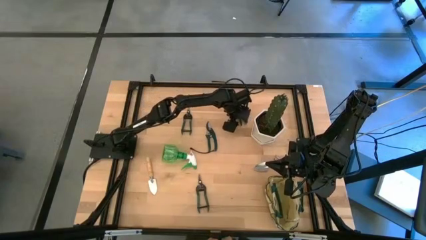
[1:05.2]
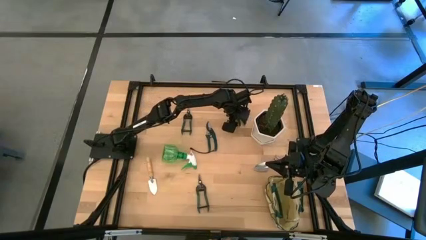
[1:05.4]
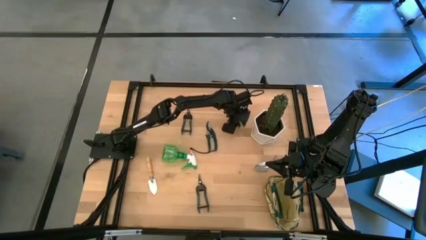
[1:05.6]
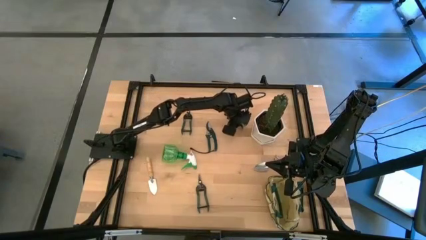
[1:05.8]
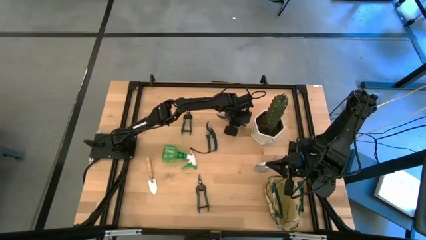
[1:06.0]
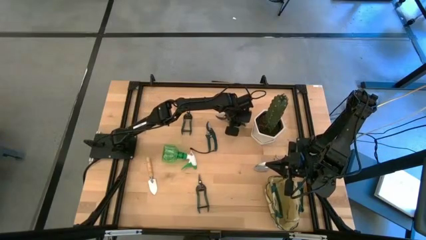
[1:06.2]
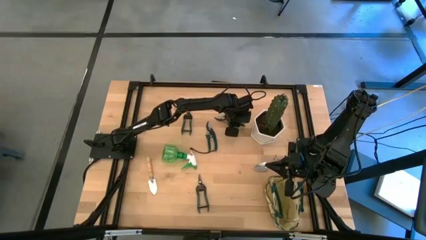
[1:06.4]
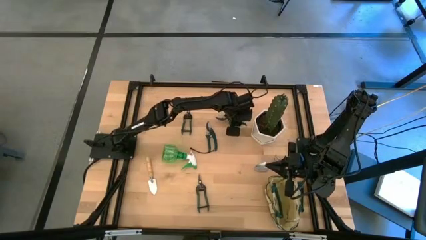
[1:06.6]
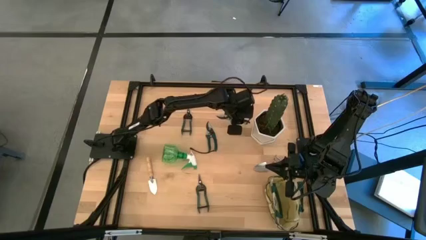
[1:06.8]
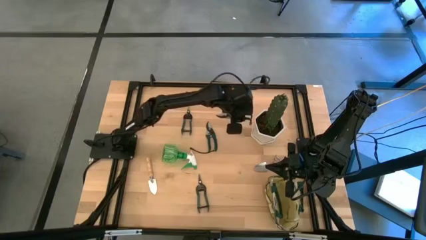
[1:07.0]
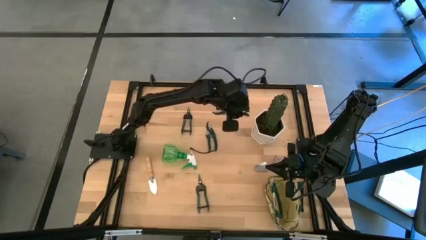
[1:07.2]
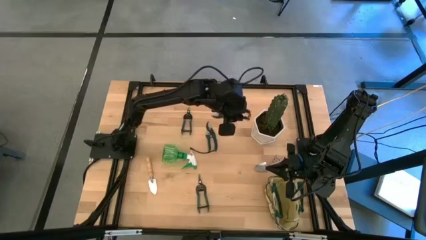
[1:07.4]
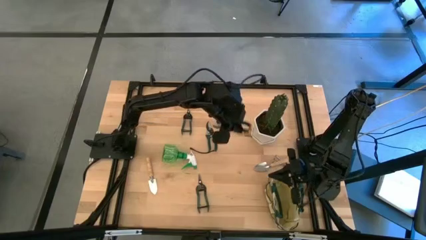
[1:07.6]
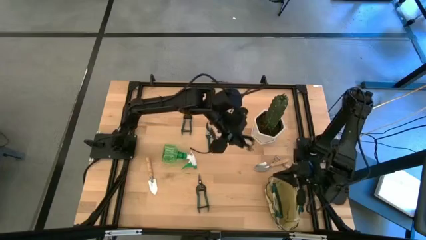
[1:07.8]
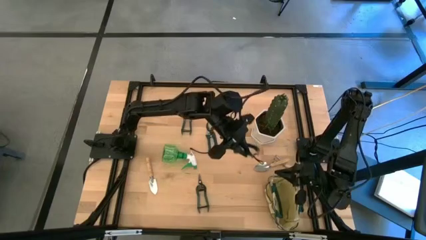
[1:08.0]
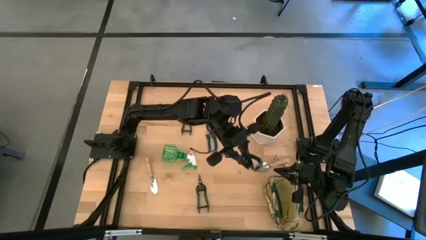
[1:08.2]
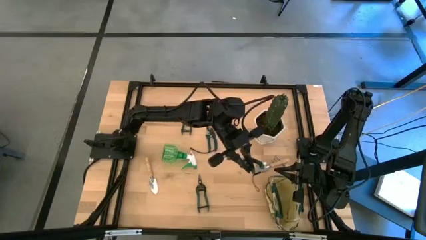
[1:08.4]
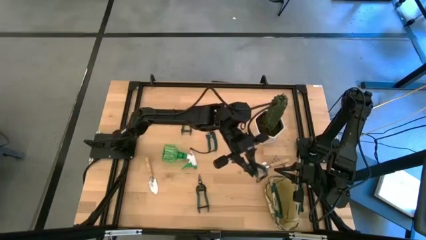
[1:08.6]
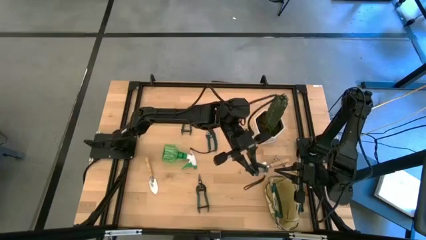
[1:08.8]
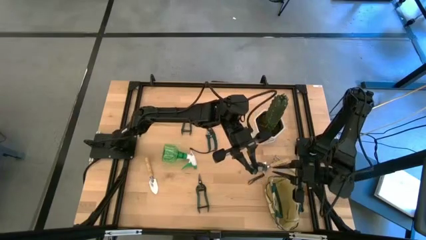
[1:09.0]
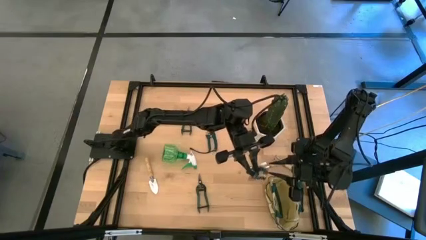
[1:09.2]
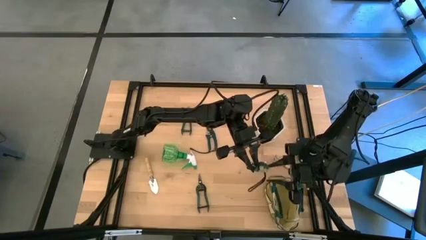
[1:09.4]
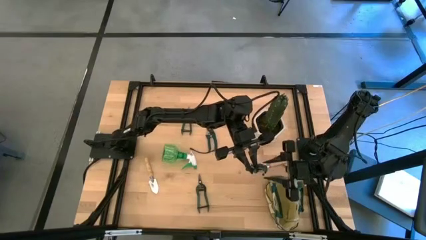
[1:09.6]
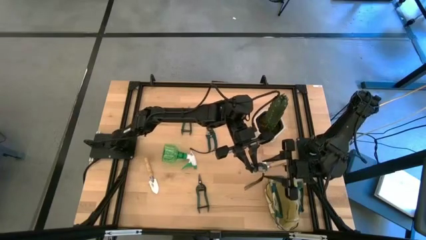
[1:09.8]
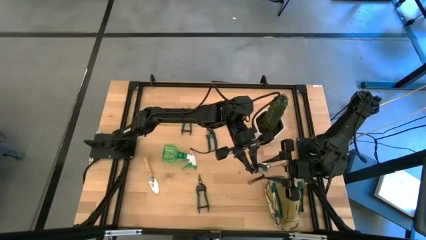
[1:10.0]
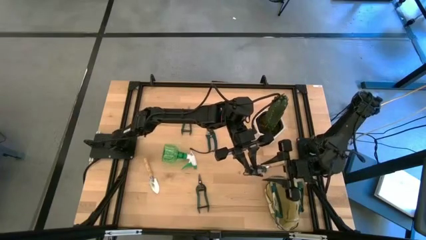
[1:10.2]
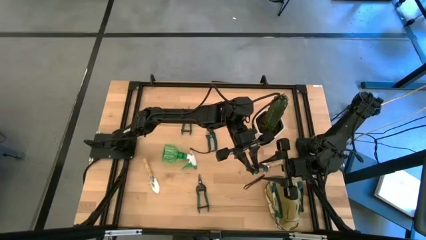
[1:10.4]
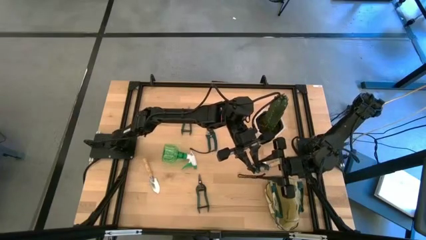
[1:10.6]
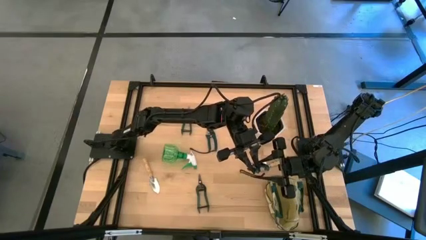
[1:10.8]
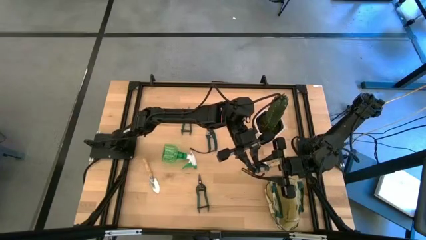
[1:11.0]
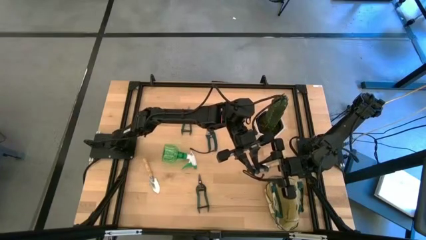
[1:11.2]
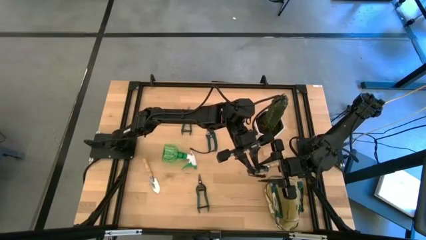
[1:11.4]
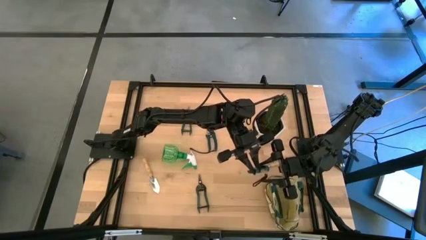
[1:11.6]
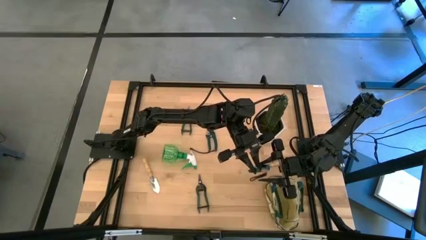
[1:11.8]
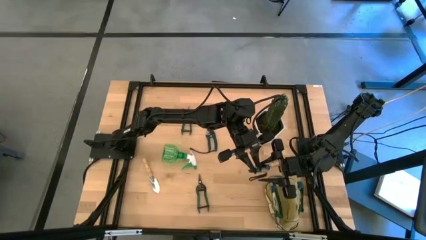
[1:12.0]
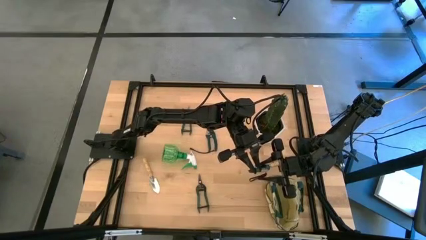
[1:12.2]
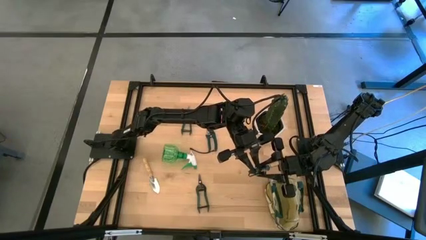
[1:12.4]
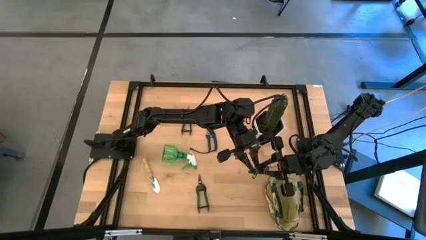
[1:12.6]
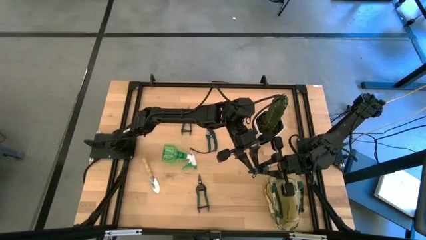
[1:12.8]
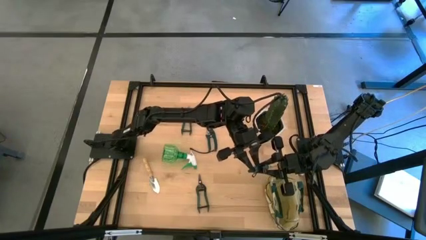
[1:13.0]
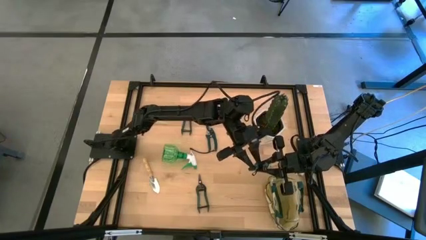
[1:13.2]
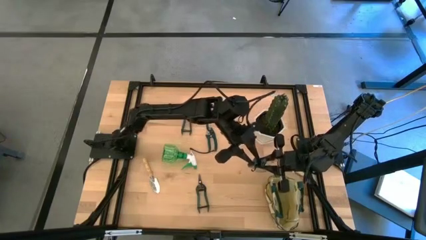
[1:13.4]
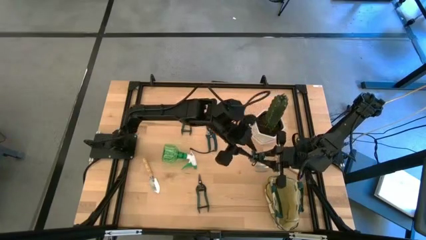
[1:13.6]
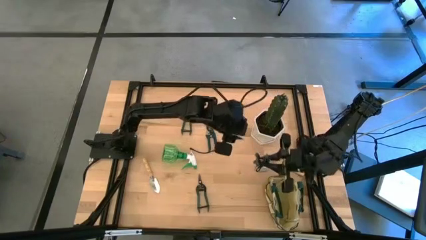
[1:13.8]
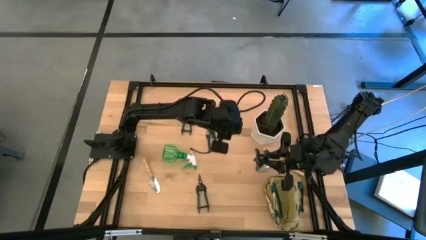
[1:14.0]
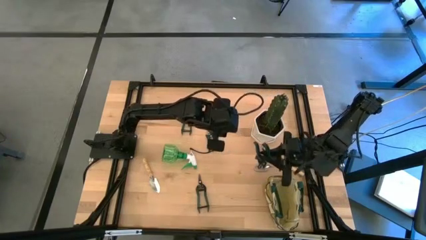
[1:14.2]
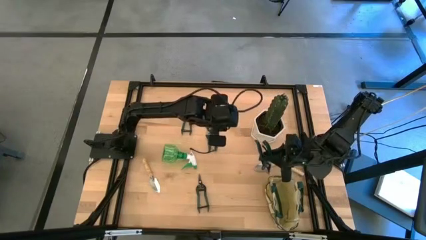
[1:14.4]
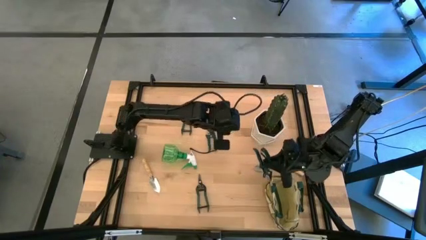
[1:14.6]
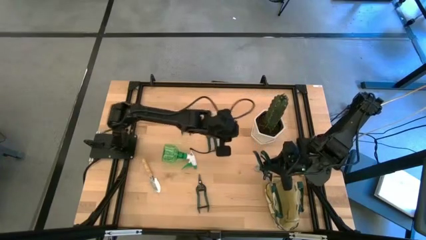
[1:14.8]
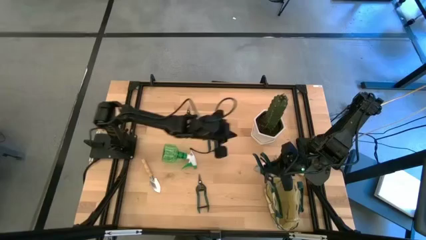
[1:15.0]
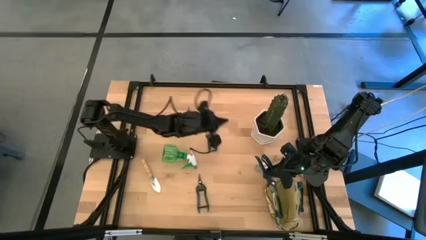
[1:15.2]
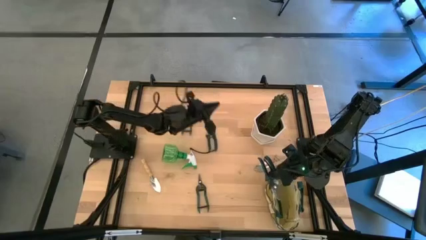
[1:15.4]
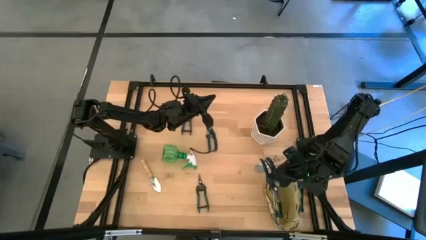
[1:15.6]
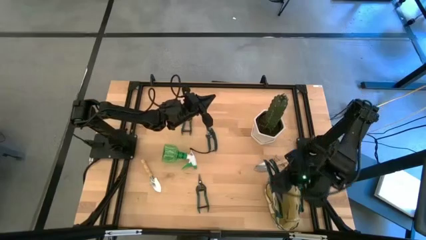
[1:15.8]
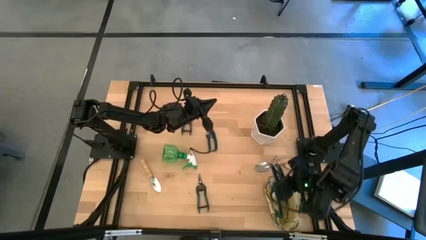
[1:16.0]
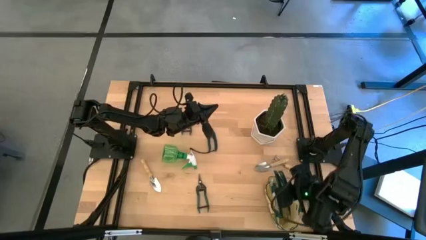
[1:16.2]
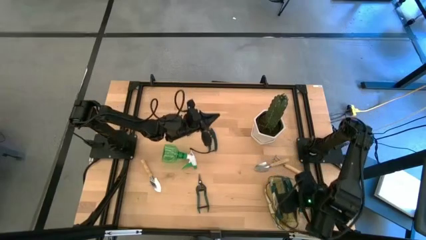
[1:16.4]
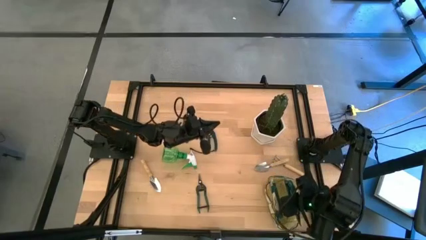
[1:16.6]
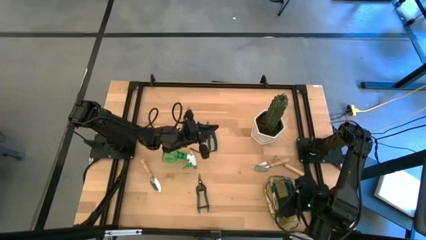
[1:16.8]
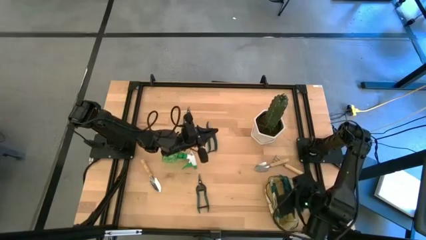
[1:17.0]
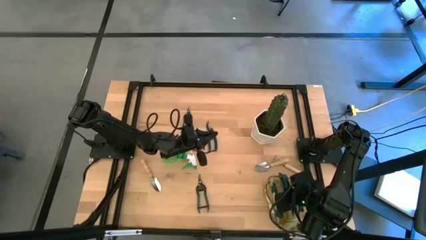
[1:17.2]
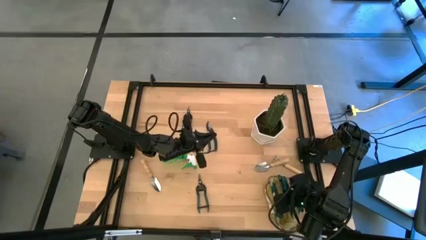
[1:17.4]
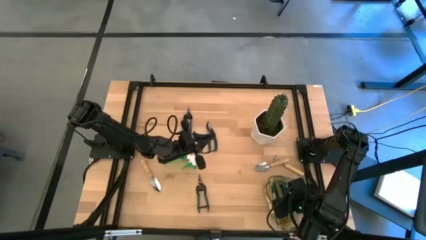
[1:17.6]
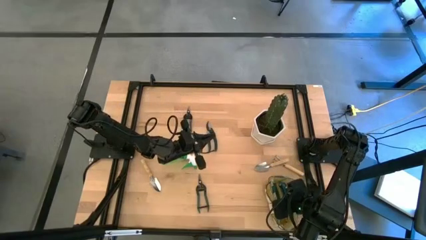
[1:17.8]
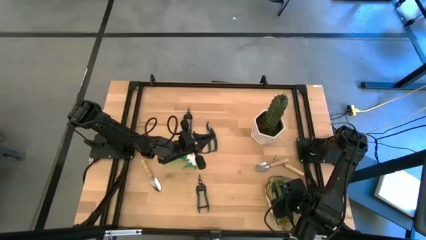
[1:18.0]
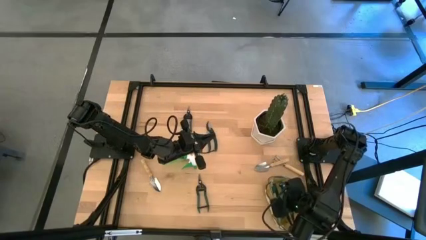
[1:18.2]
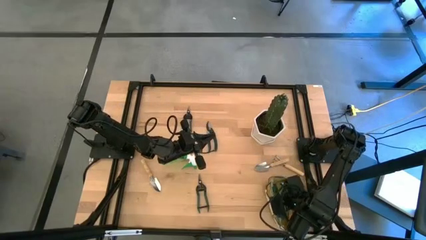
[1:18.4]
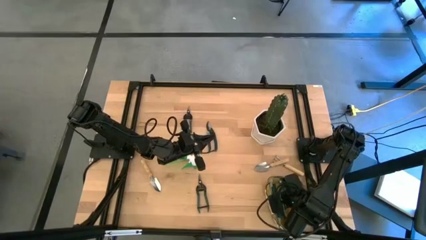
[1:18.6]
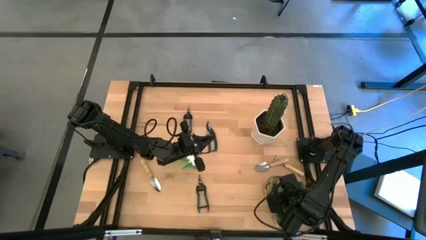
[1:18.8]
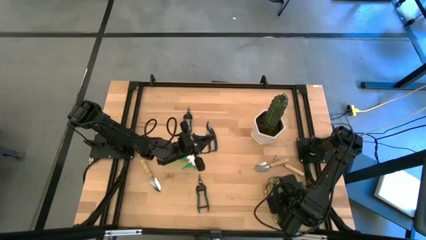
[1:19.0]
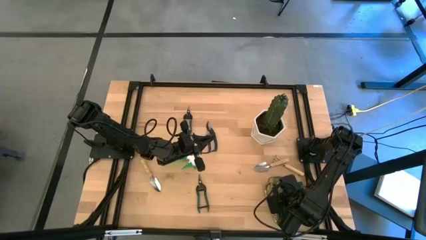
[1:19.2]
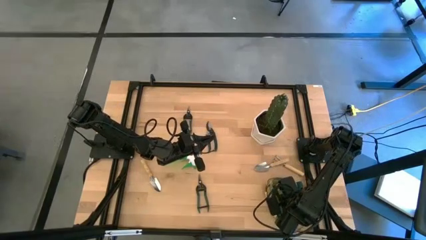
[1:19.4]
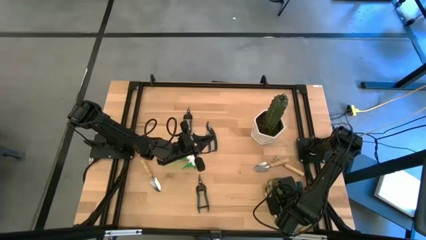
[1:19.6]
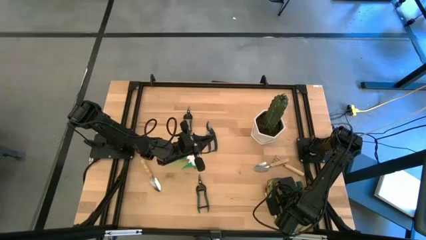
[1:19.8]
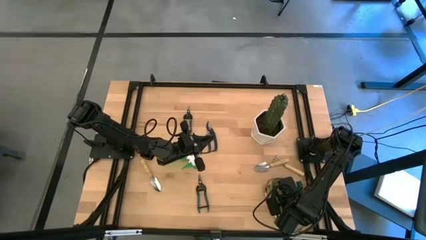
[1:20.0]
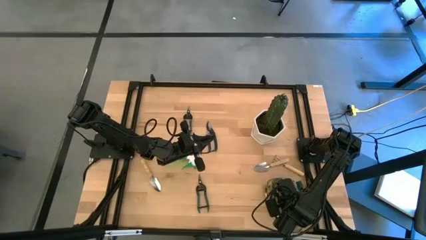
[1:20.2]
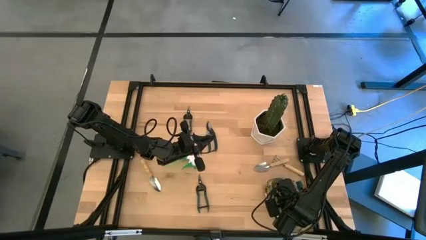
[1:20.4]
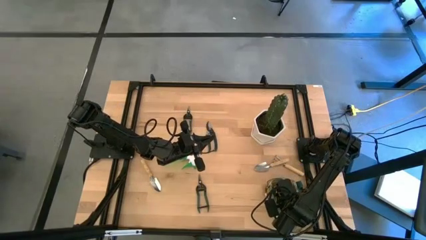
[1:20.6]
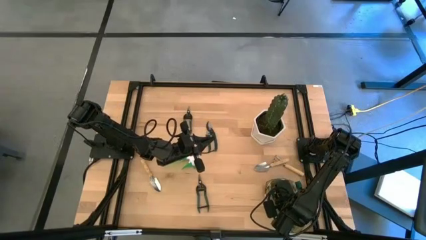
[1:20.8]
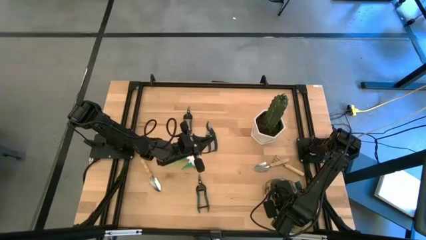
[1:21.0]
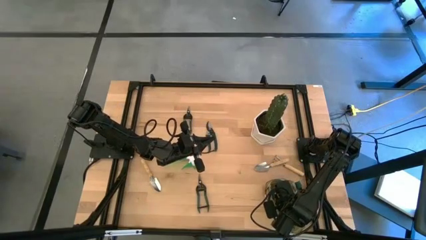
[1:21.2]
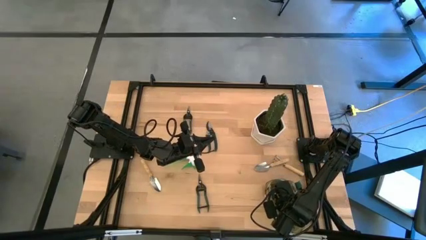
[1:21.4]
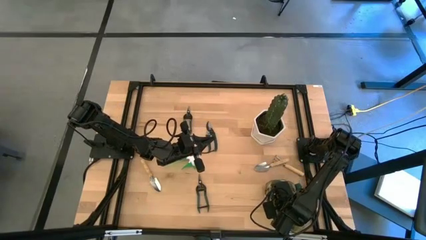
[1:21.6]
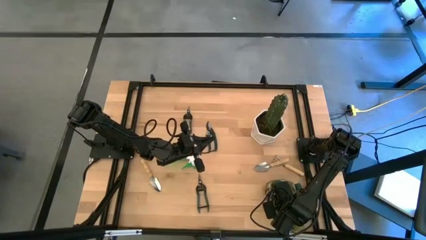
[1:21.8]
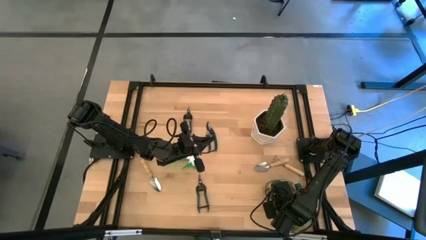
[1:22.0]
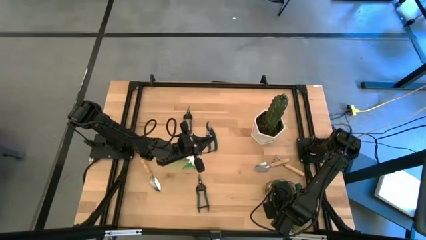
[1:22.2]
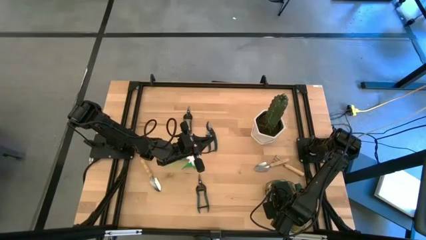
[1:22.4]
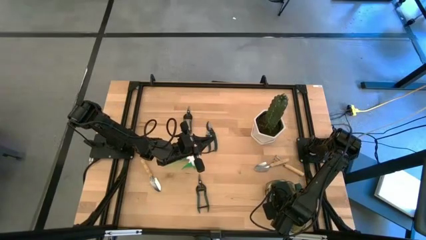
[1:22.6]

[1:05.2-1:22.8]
Task: Pick & Place Garden tools in Gardening bag
Put the top right hand pruner into the white bag
